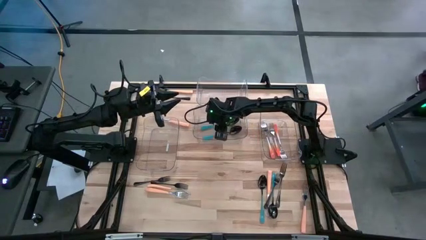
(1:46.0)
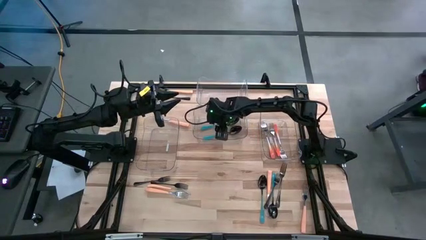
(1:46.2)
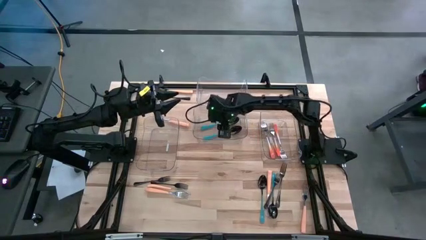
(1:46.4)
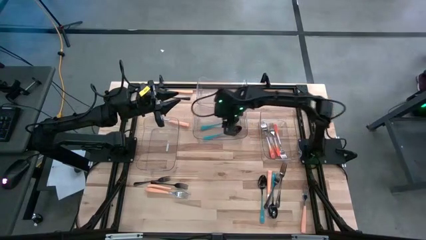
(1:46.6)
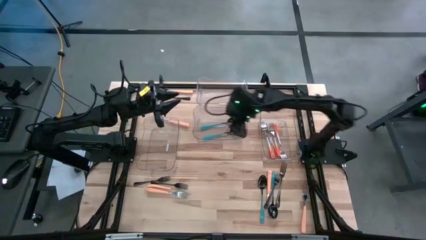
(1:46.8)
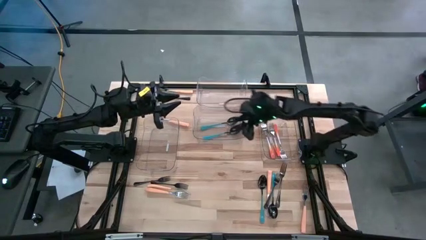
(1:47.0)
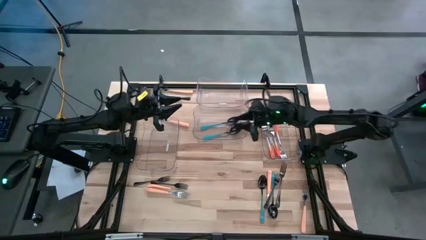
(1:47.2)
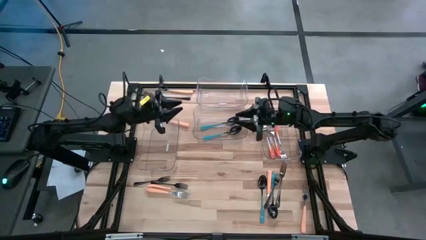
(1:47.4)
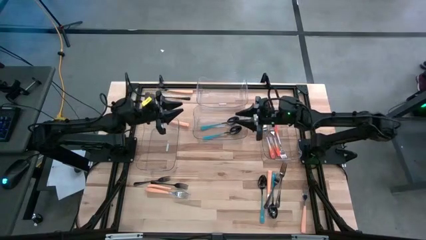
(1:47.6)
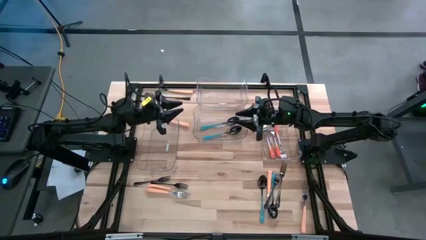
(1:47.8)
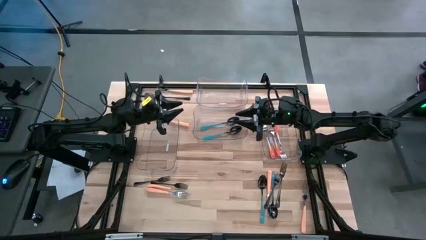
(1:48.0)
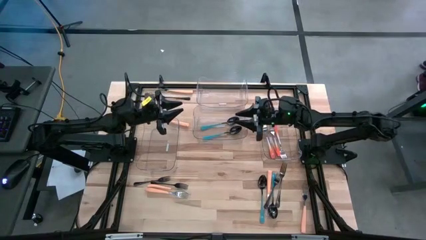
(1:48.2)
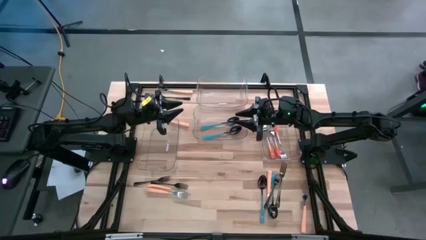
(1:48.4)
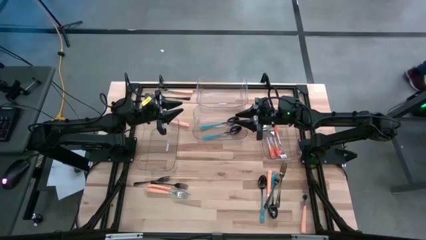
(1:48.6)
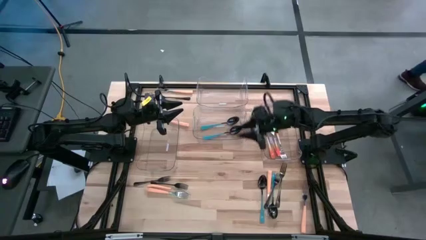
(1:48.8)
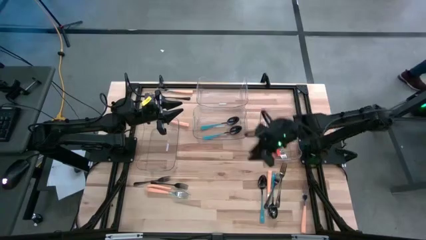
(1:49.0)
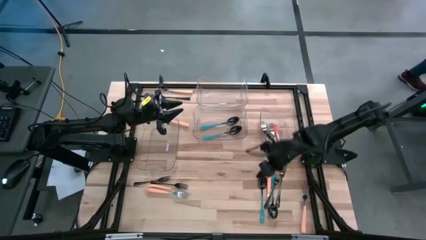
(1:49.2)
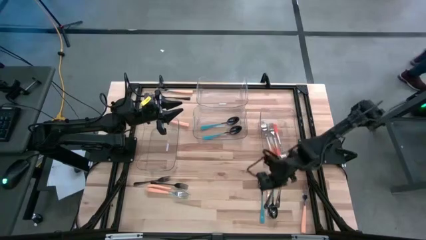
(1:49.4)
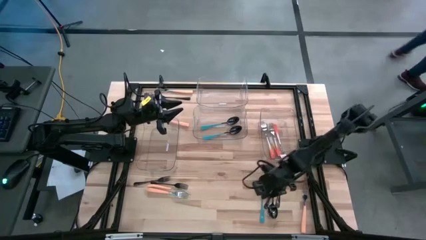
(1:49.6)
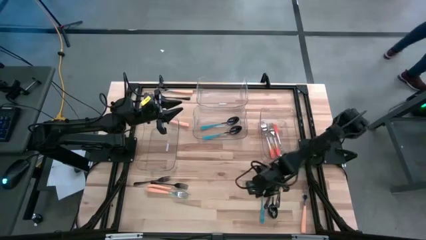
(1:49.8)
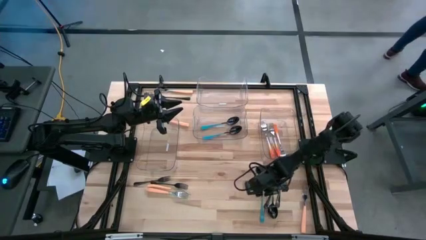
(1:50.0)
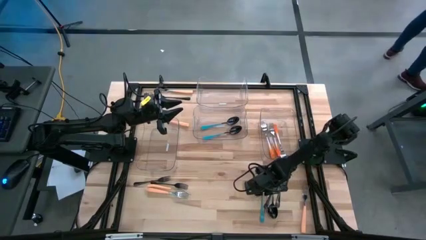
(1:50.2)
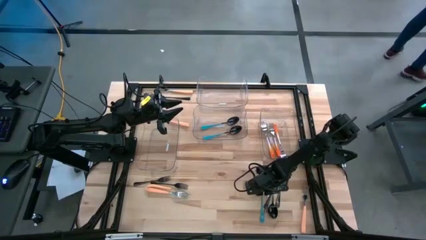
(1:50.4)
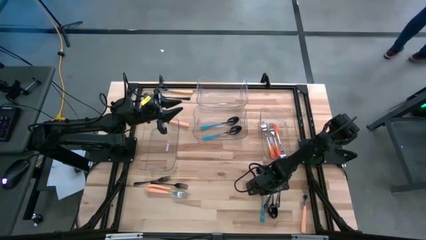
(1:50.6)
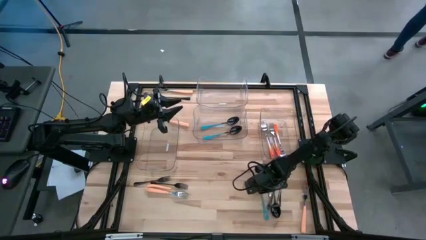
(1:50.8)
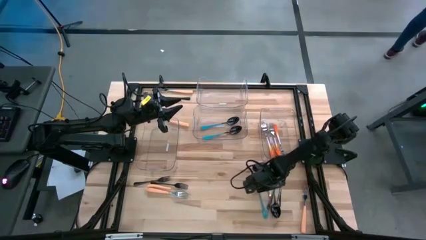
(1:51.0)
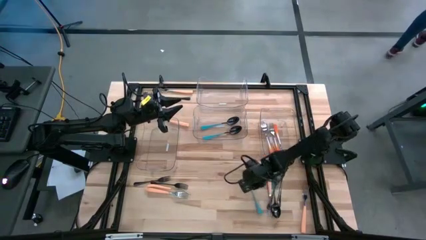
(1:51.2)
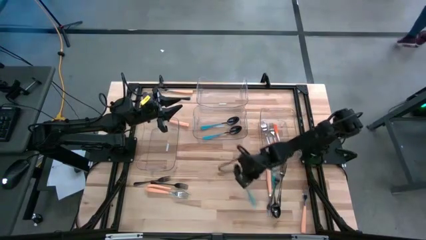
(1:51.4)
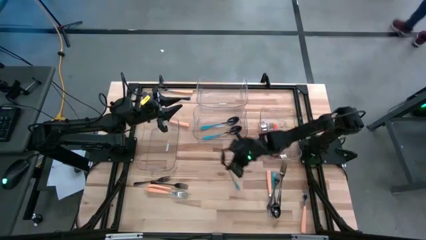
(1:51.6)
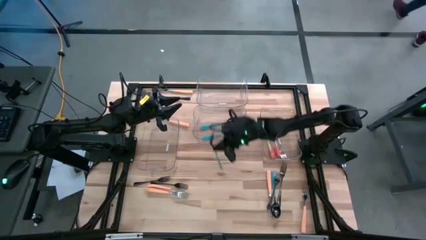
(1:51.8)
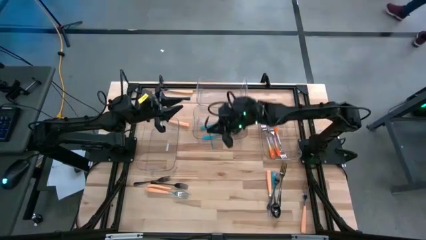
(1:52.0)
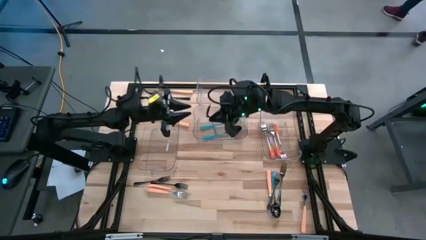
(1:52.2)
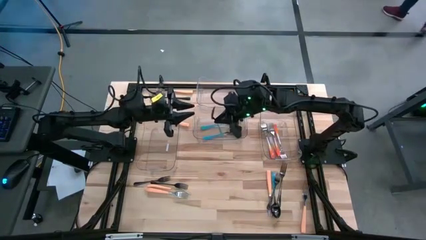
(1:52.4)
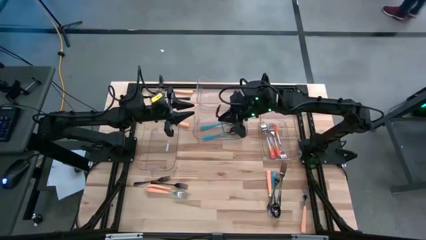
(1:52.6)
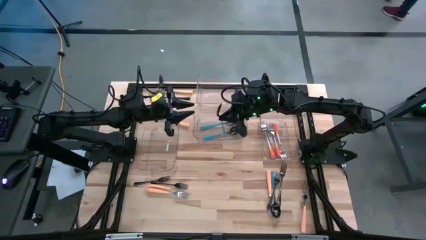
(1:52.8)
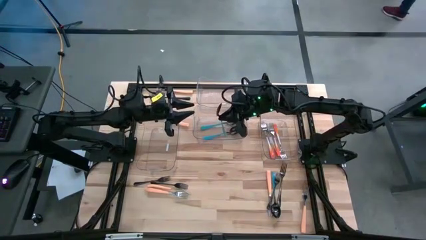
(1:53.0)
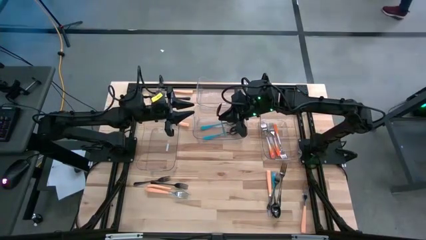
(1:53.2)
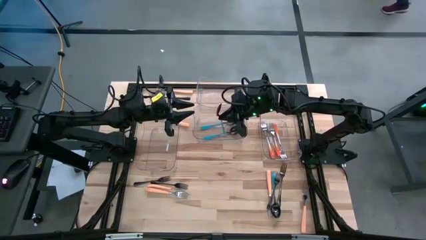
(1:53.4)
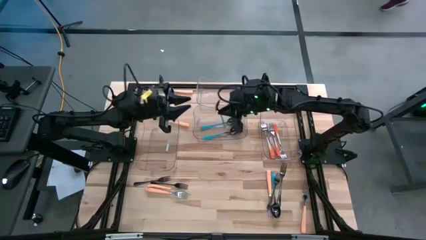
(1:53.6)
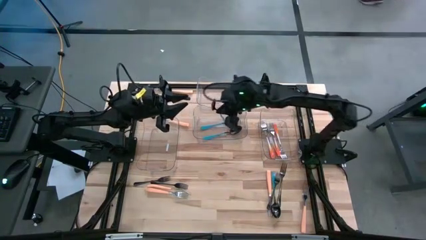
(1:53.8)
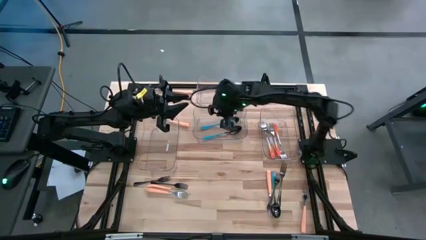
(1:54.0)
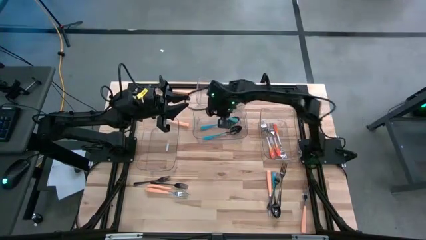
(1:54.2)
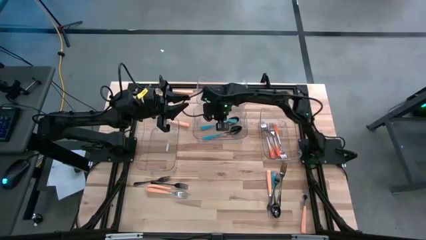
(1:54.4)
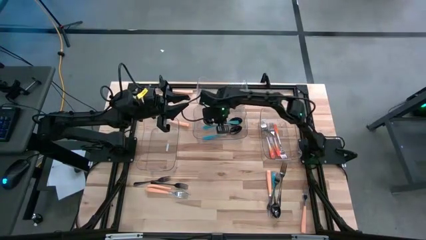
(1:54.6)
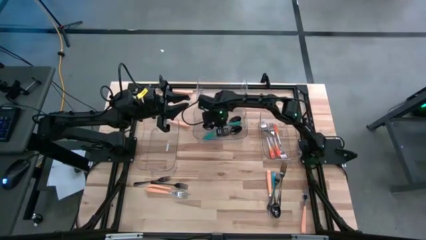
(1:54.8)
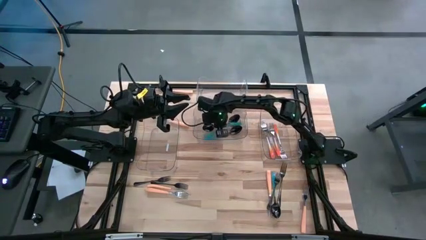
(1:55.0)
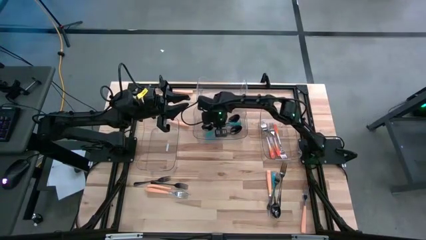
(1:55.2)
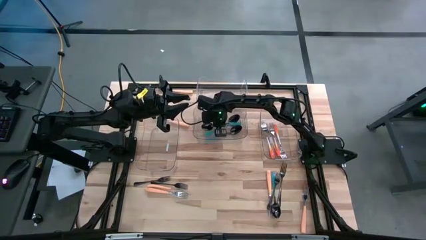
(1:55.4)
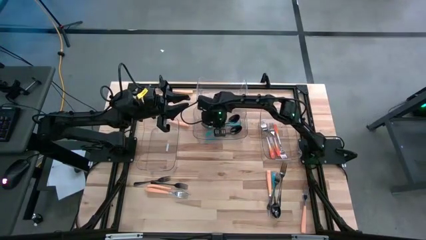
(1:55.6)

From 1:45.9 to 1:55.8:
Task: Sort silverware by color (type)
Put the blue spoon into the middle transparent bin

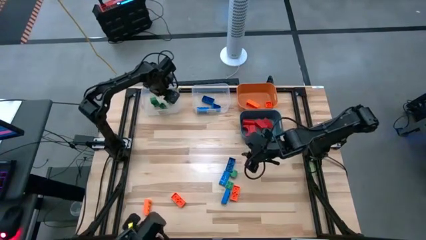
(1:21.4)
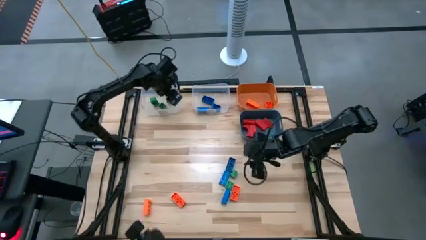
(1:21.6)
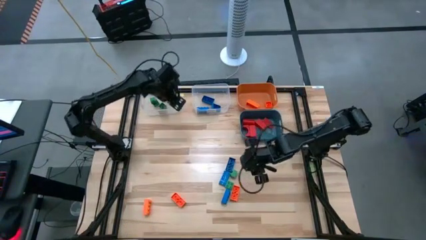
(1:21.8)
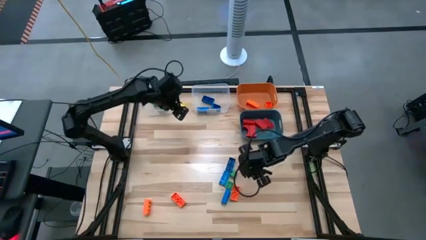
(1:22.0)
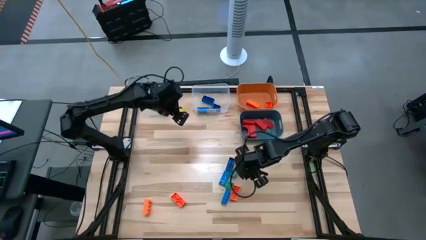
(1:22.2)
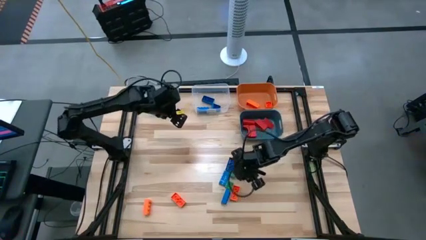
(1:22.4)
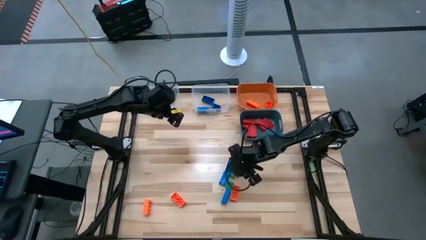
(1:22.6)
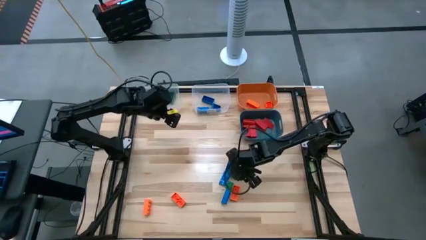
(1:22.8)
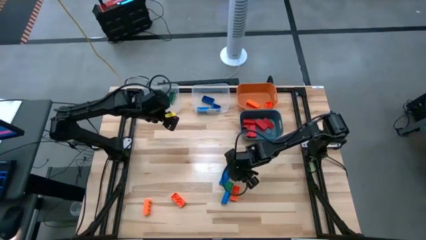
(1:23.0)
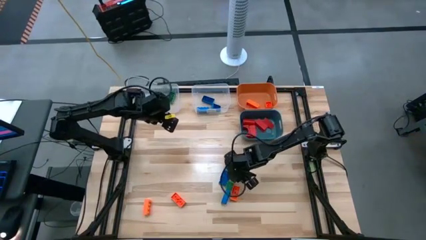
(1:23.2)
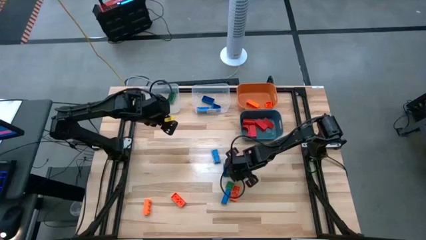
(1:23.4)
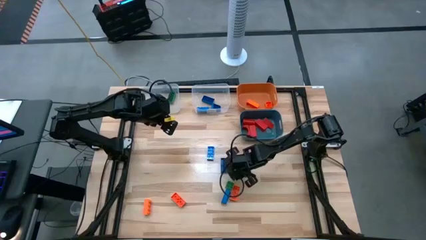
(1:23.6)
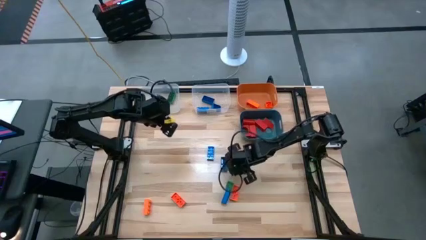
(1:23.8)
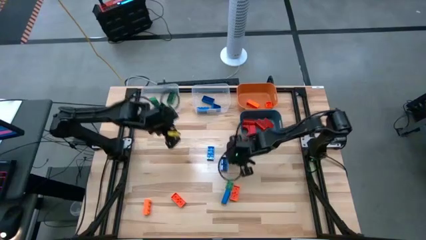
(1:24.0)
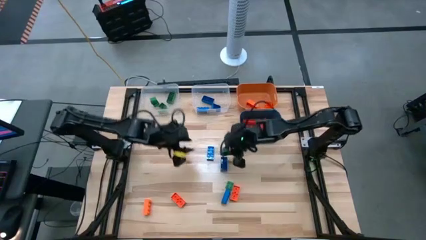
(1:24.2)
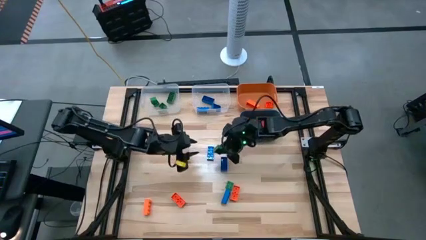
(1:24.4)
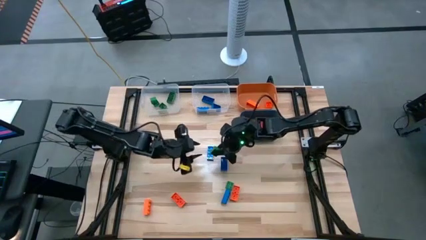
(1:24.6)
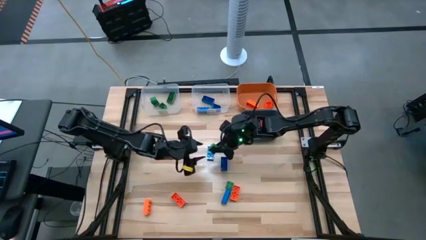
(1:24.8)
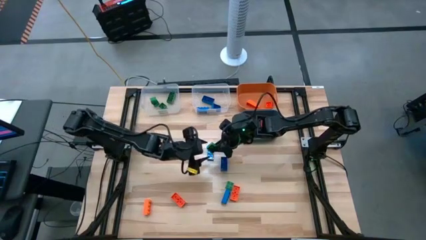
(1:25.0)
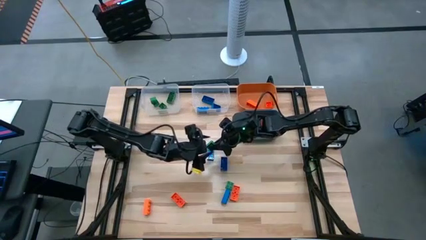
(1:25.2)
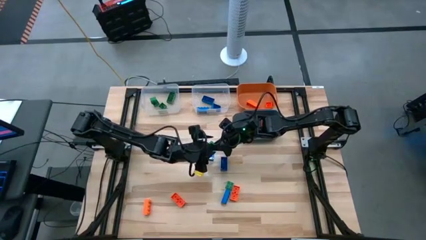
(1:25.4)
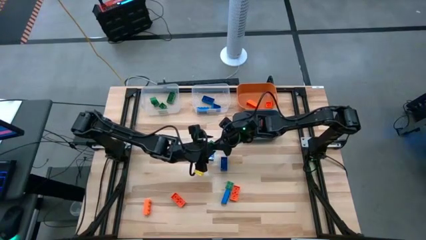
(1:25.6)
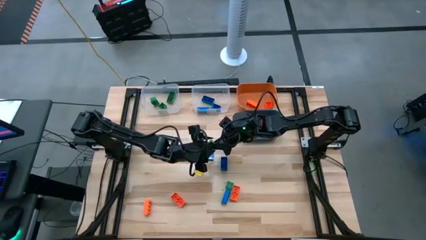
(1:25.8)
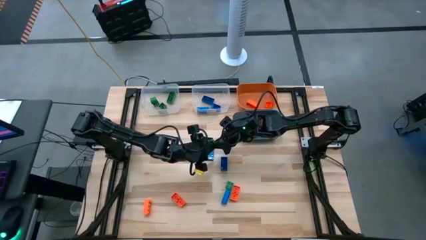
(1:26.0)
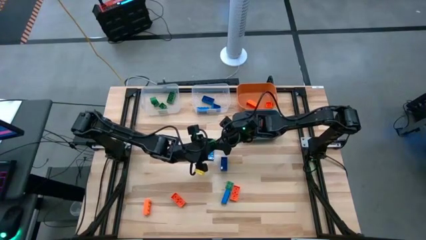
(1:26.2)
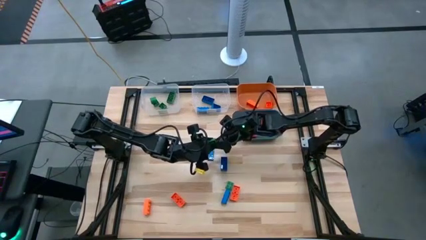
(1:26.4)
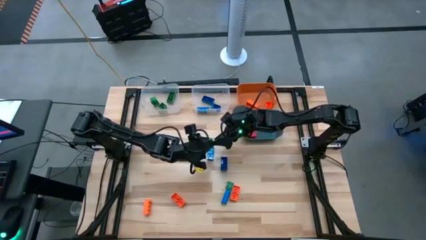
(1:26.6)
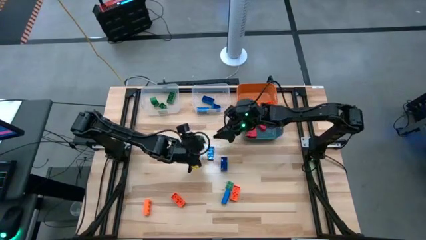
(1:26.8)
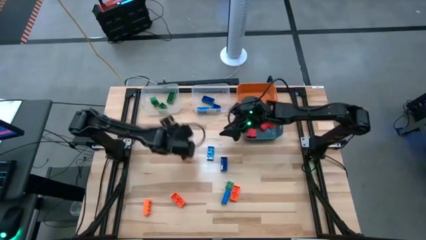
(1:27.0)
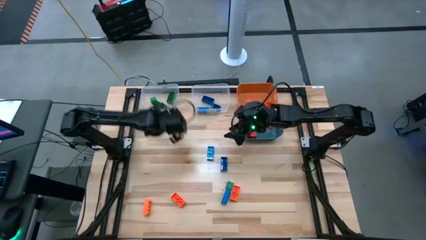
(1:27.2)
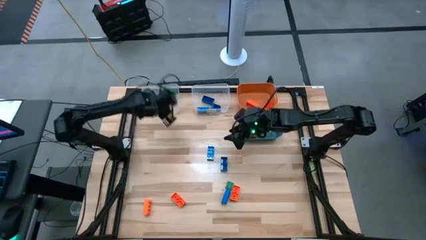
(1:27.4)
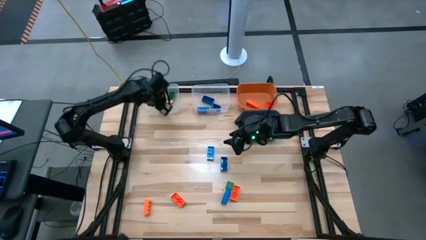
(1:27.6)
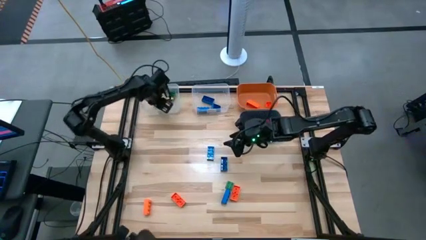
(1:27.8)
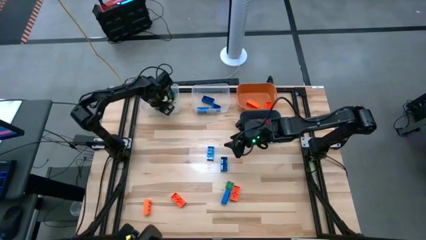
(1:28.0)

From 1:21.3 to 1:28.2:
Task: Sort blocks
Put the green game piece into the left transparent bin
